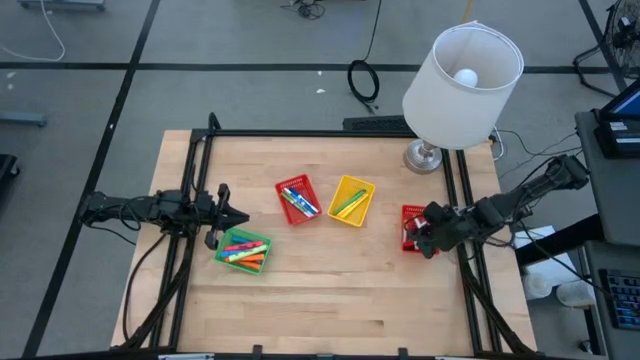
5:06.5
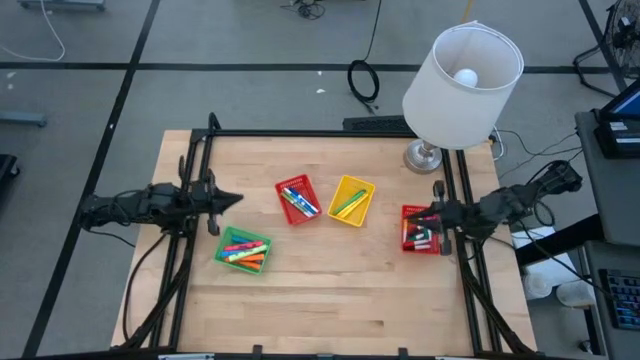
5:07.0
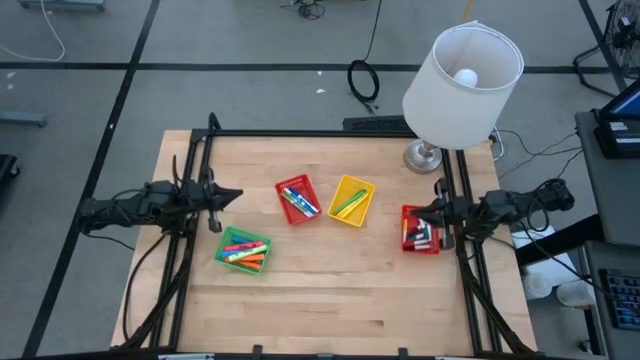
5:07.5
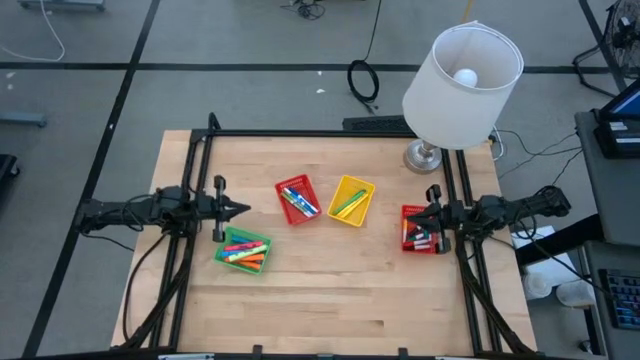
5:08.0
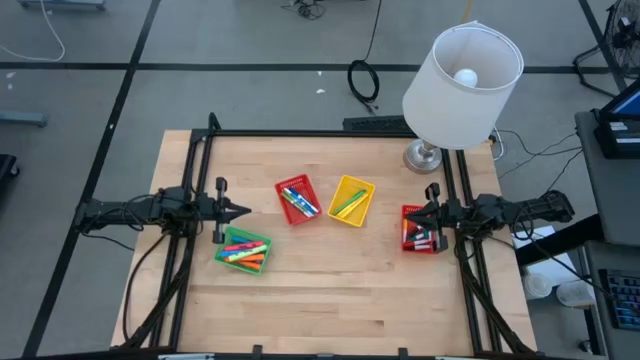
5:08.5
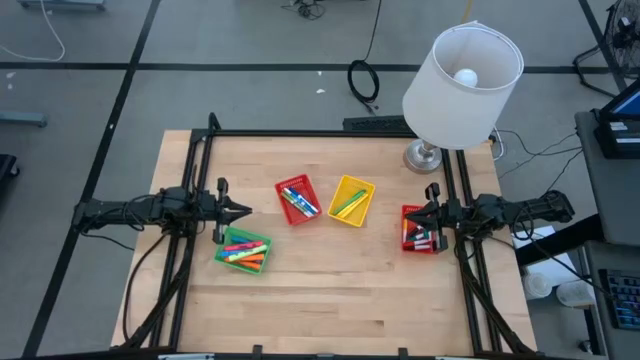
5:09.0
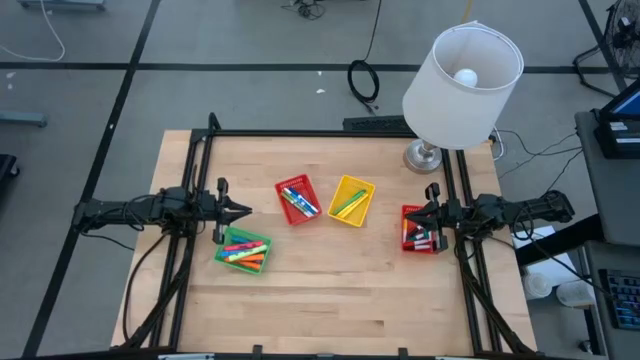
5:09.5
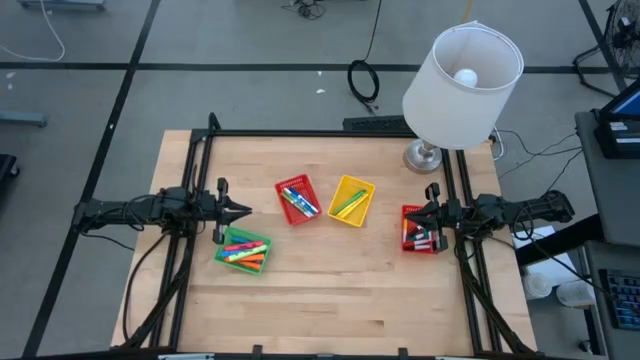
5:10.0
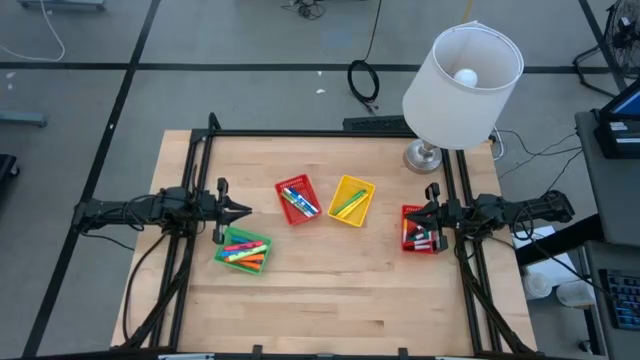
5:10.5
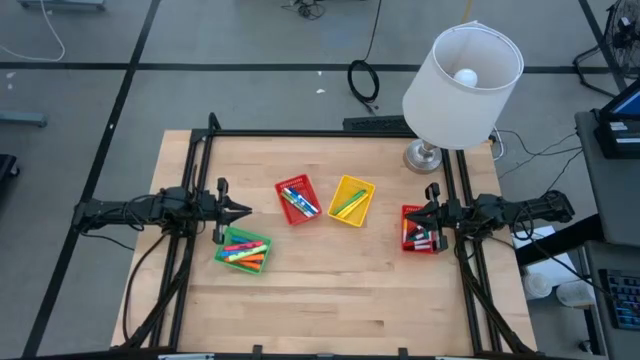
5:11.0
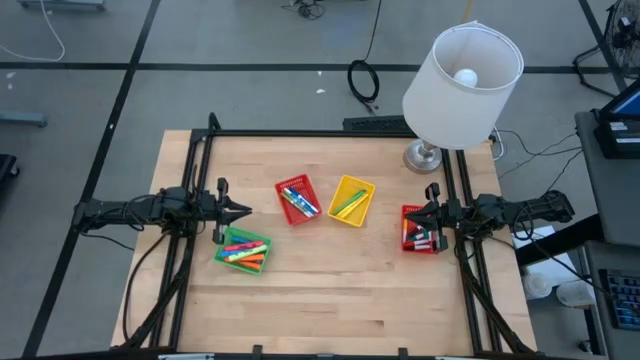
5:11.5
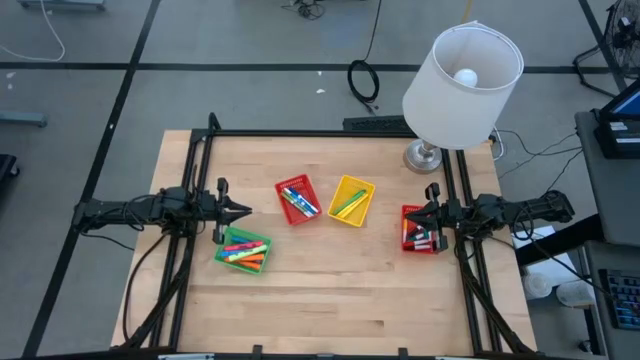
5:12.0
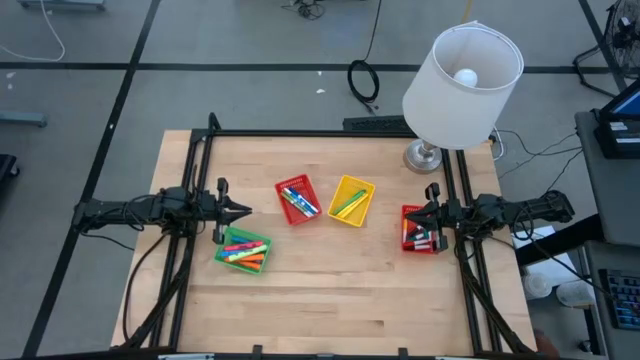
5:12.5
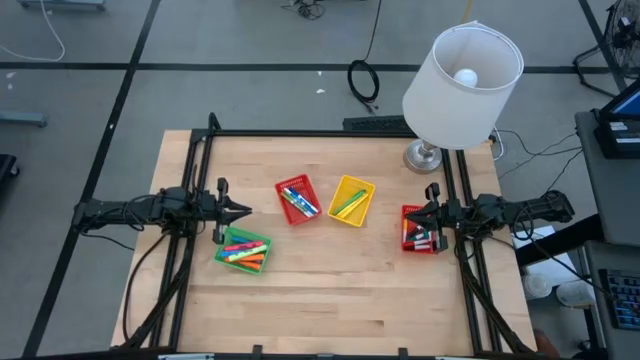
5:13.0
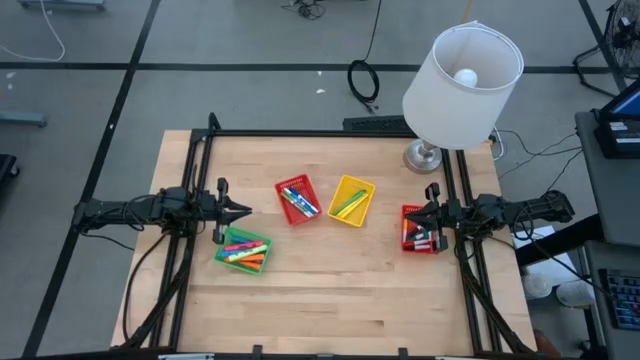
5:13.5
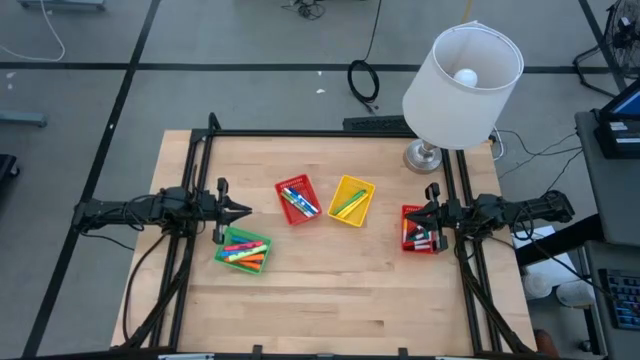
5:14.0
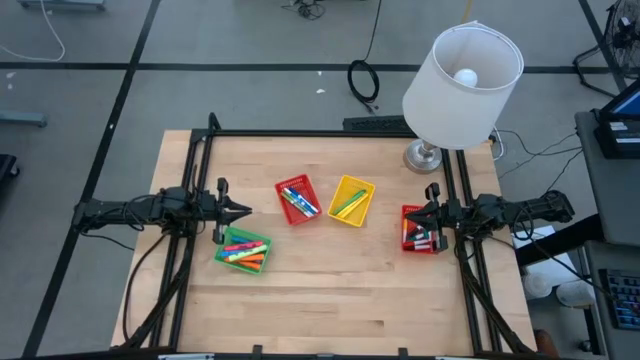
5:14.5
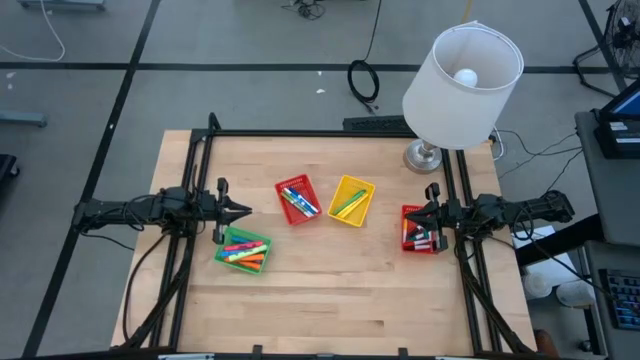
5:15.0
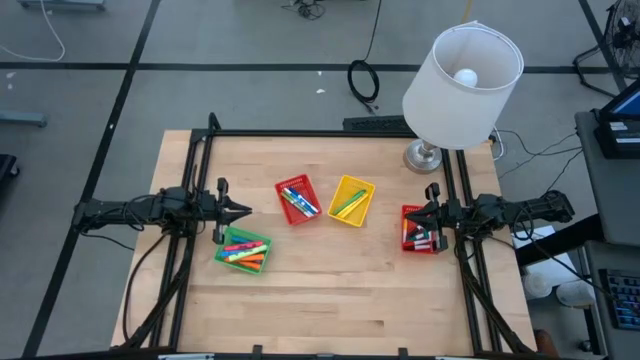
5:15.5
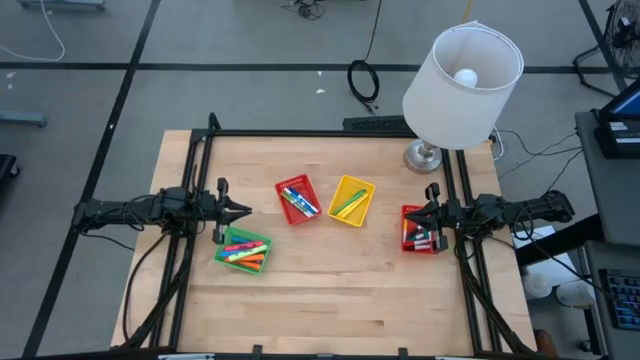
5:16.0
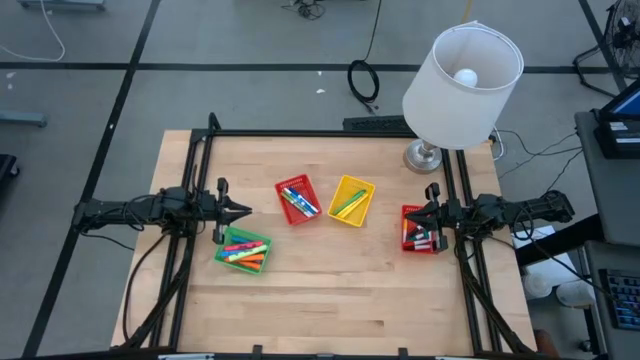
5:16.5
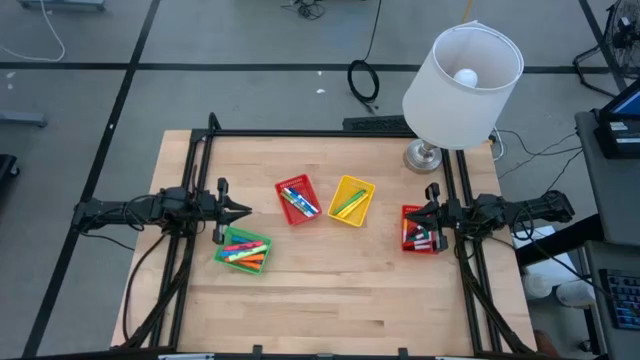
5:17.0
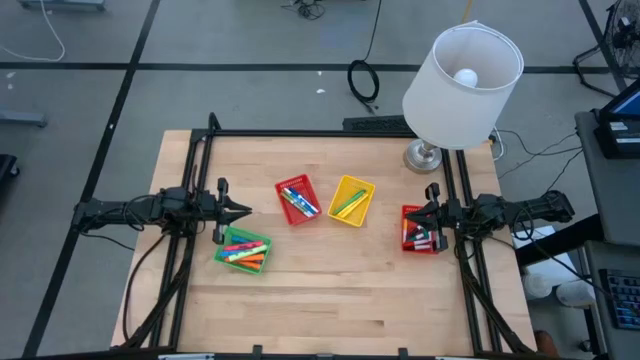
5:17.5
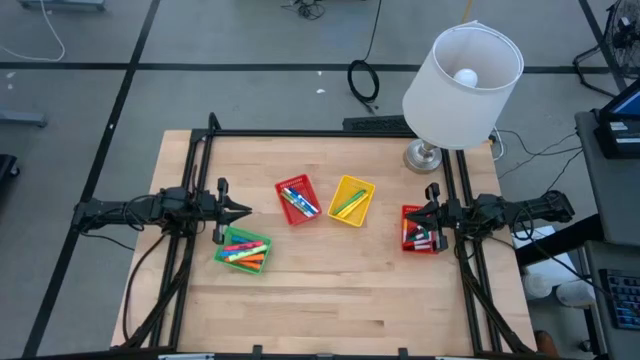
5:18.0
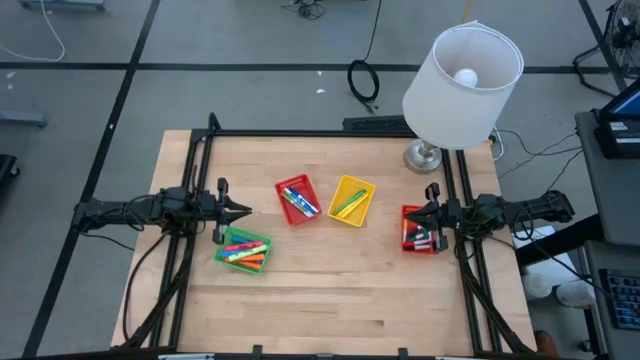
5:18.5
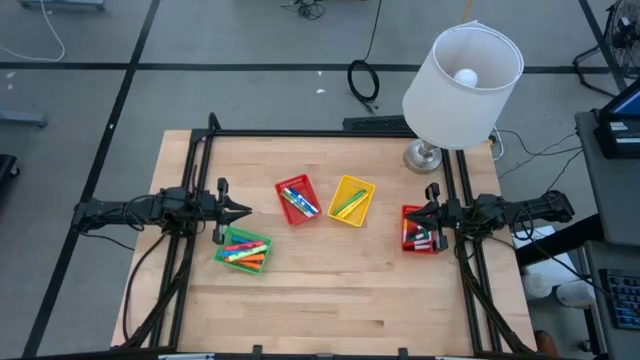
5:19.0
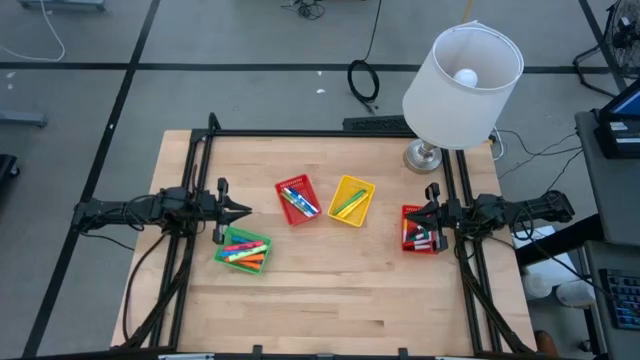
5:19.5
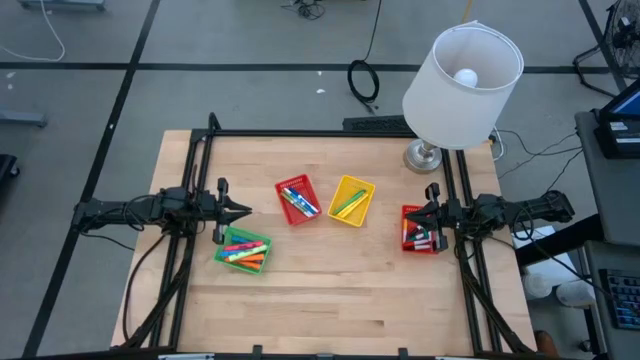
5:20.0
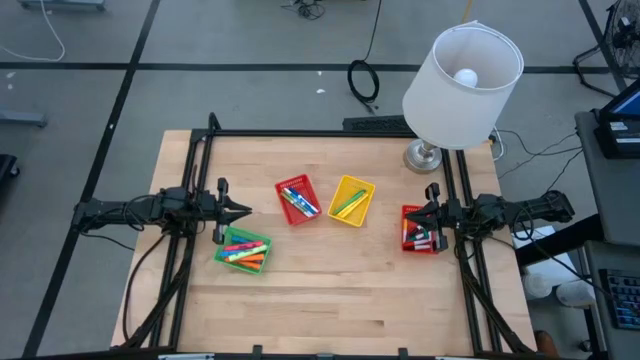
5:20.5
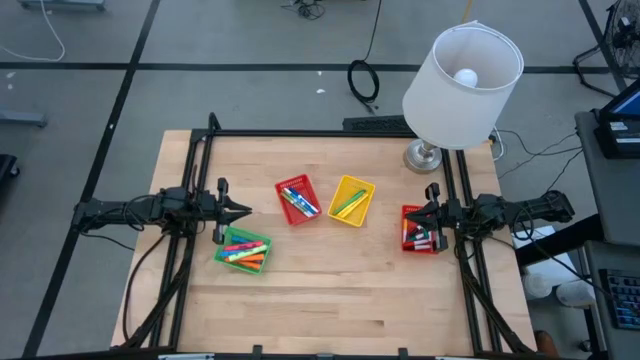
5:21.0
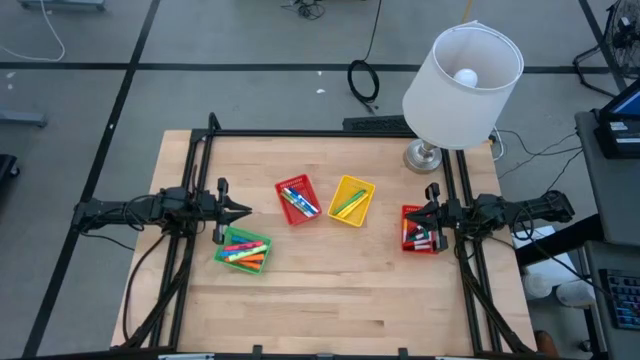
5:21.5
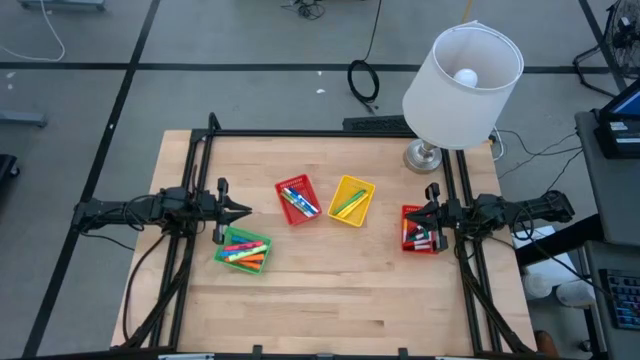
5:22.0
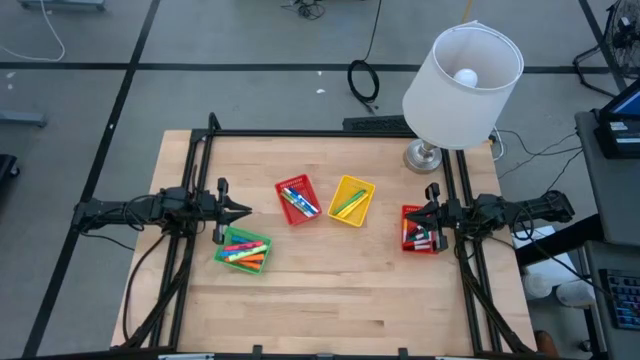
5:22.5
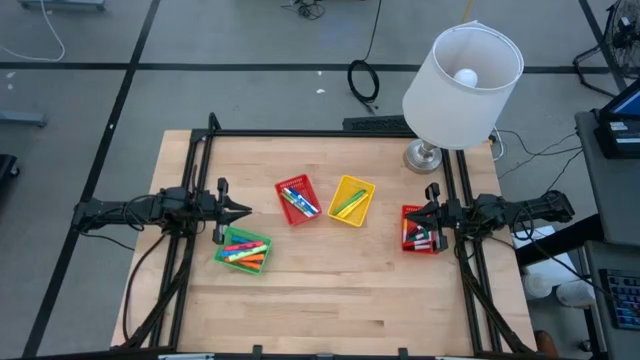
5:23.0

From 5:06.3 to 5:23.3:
Task: Pick & Place Markers
Return to Home Position

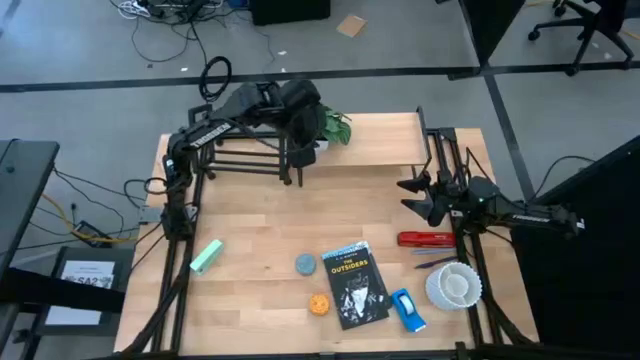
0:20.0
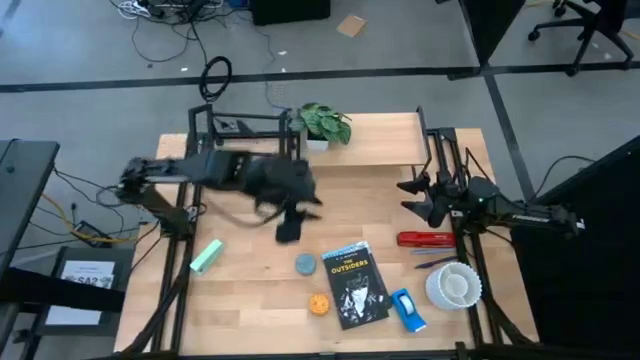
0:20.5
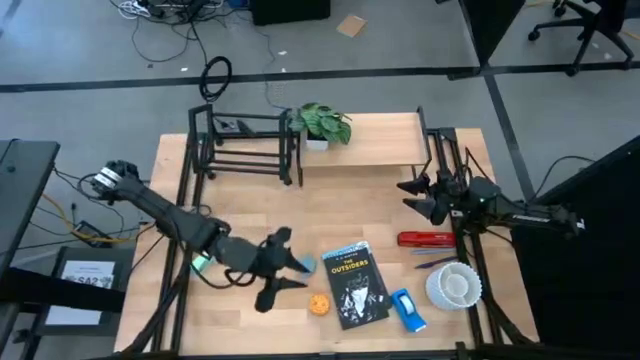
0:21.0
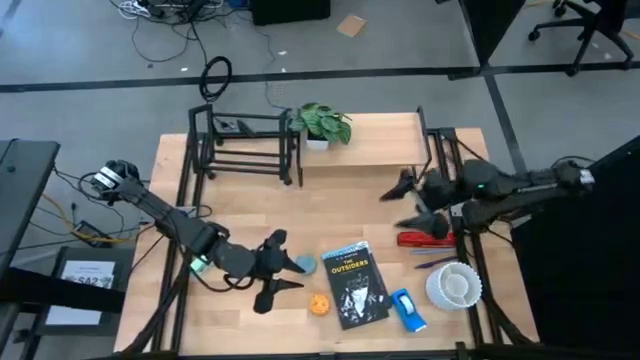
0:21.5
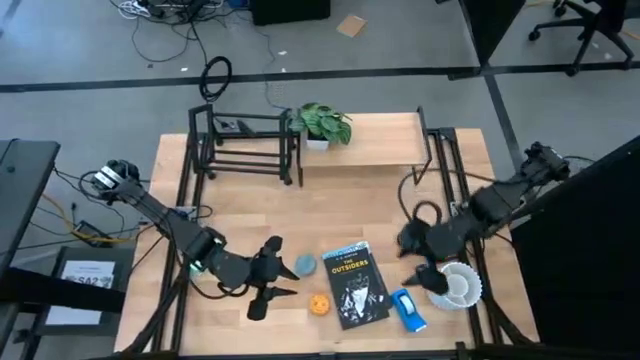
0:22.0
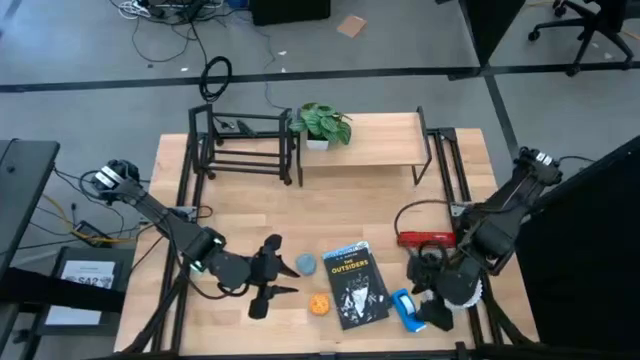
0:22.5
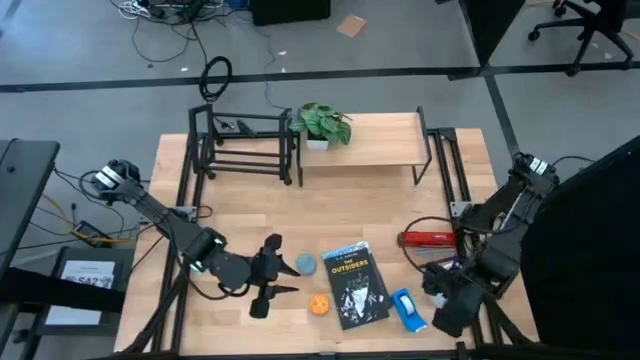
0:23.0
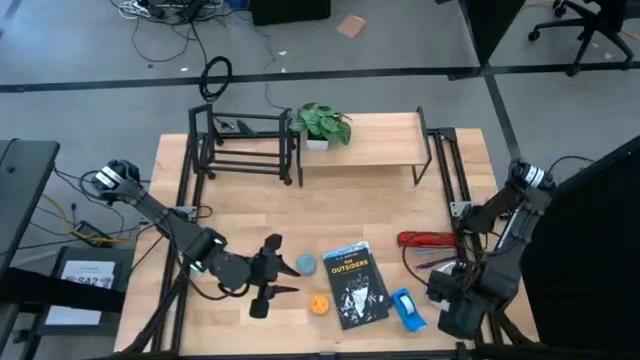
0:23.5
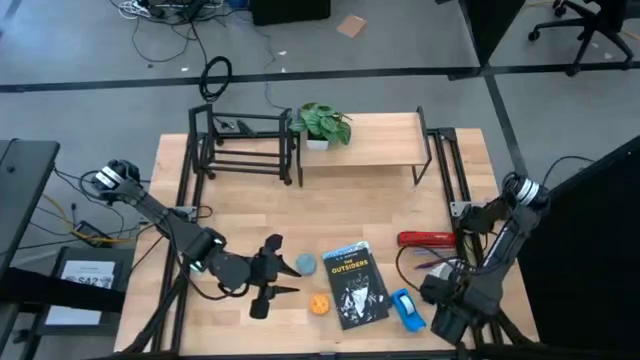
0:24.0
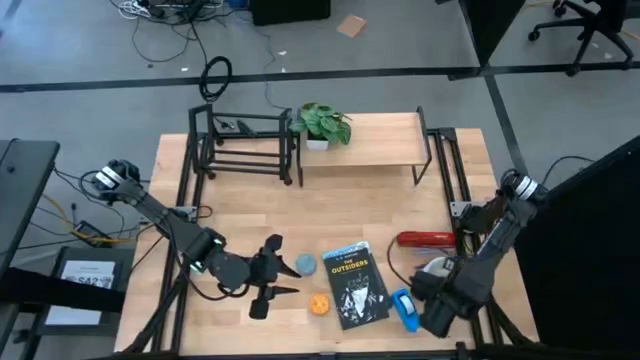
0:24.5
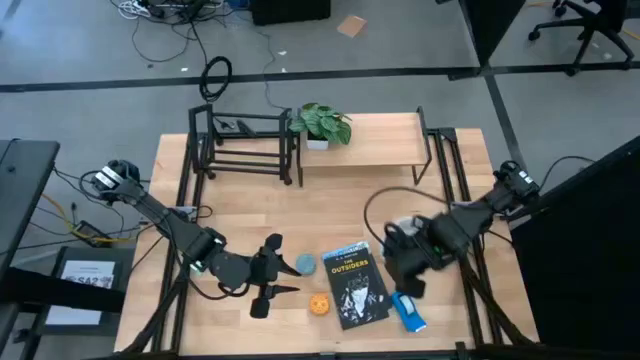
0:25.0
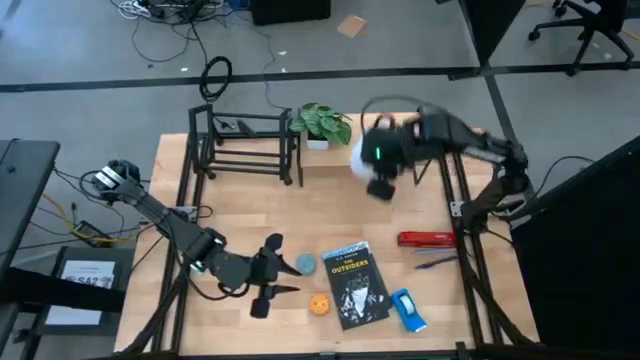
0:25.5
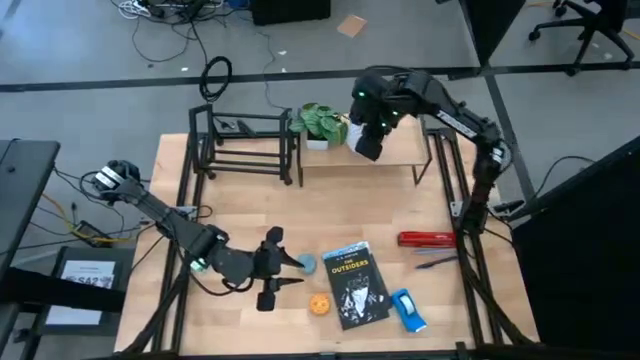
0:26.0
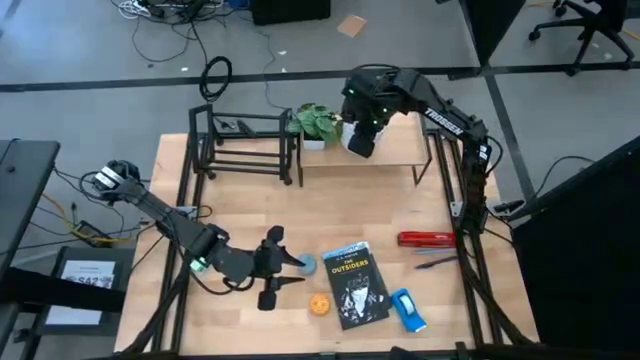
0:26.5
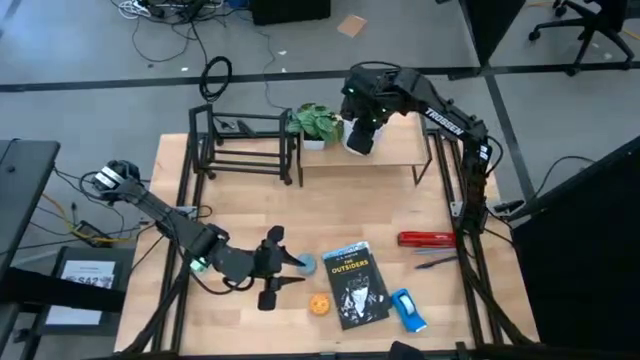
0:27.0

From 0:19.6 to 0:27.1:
Task: Stock shelves
Put the white pen organizer on the shelf
